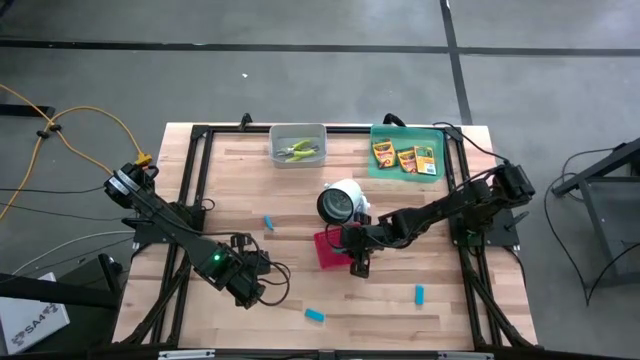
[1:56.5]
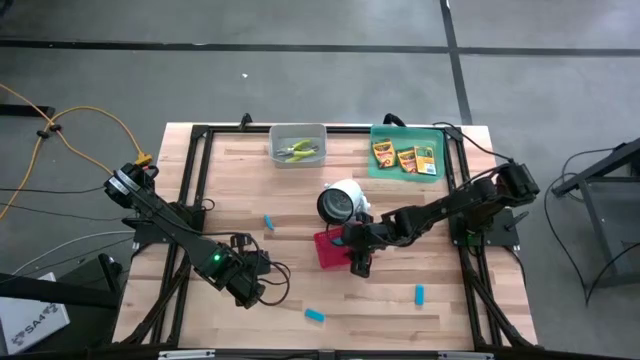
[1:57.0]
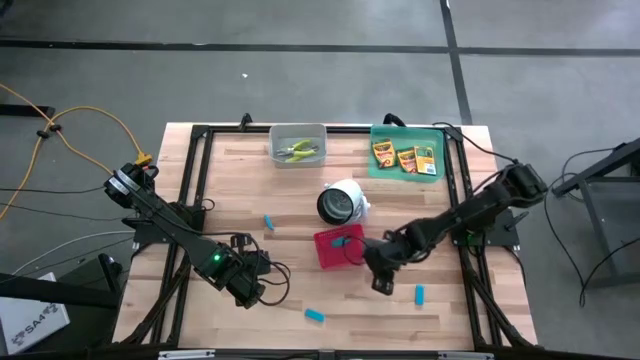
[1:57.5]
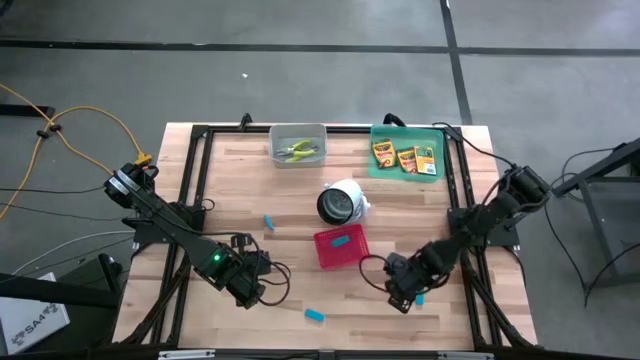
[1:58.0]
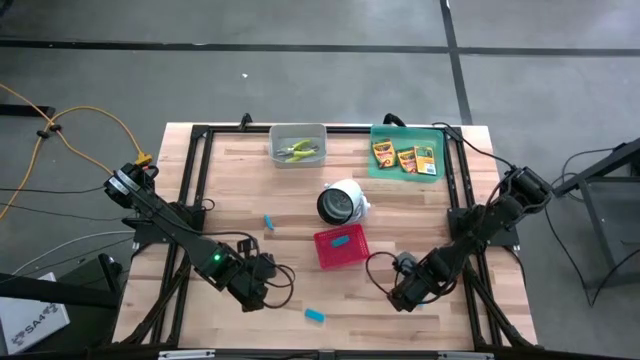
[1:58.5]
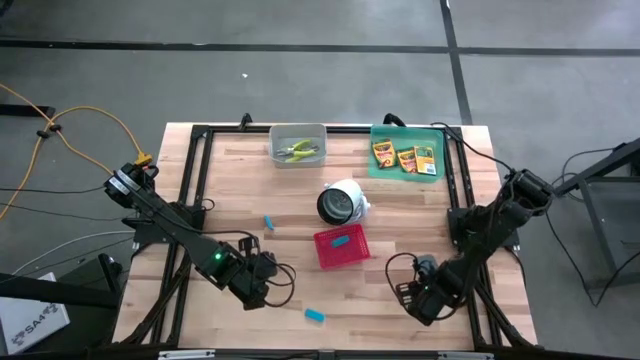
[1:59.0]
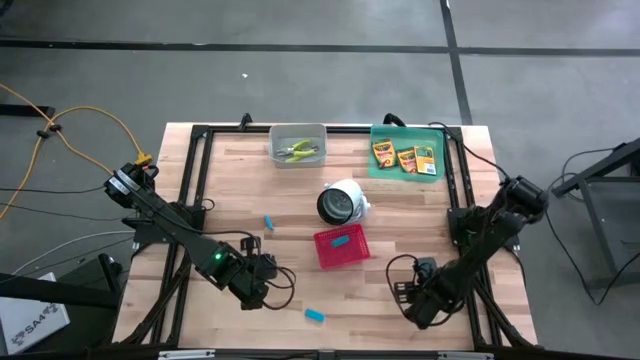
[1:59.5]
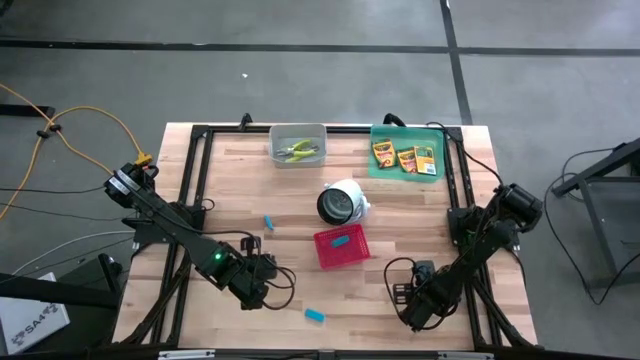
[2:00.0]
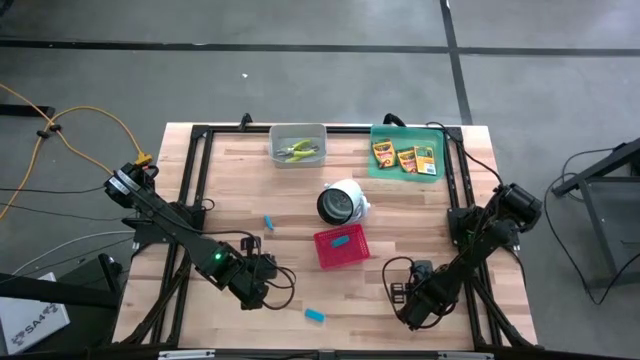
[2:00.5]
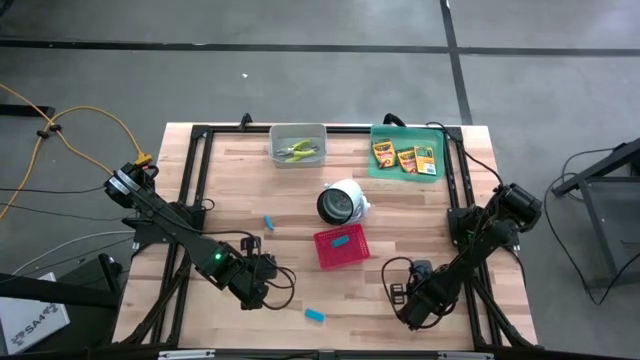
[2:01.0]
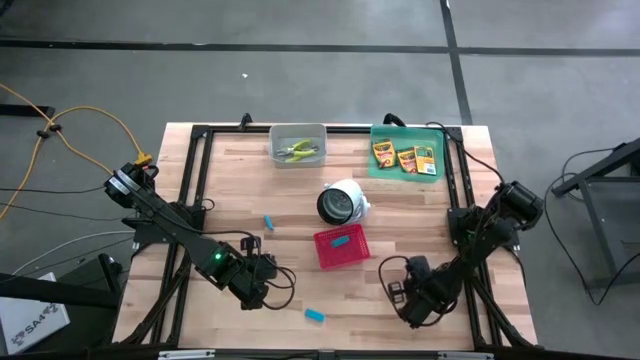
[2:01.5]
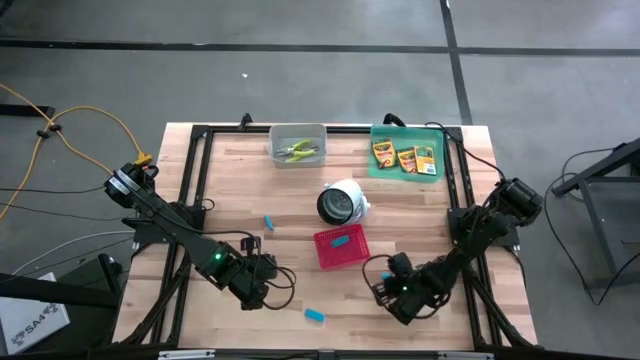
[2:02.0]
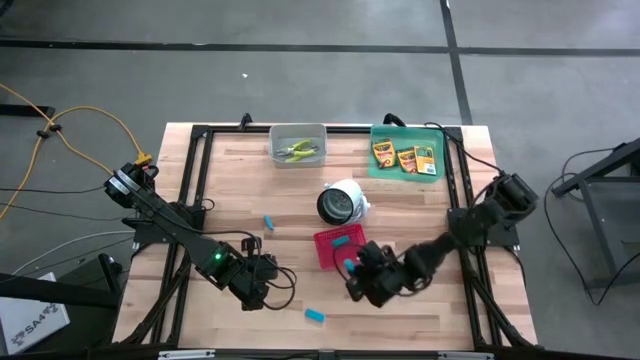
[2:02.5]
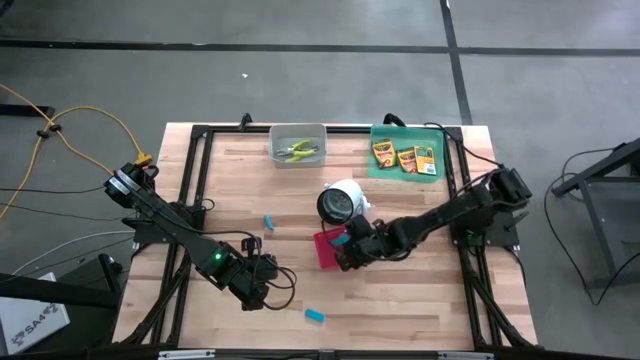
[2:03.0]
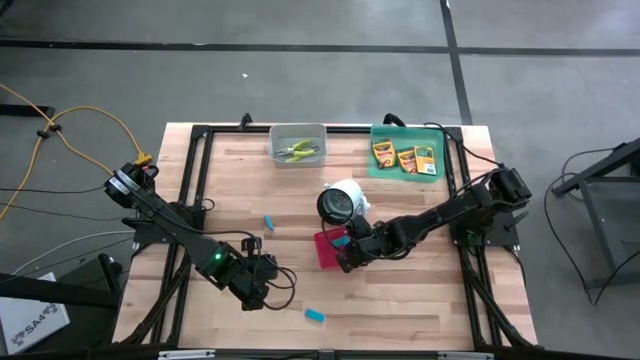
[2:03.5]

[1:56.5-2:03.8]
Task: Pick & Place School Supplies
Put the blue eraser into the red bin

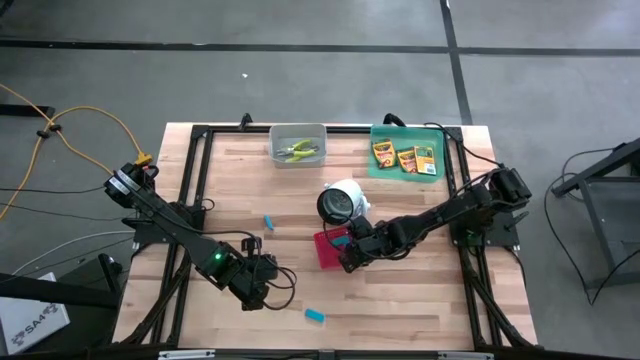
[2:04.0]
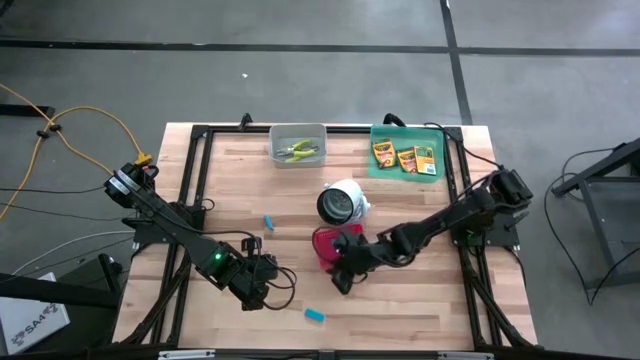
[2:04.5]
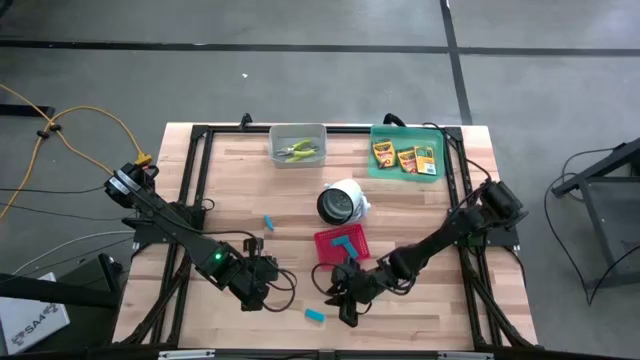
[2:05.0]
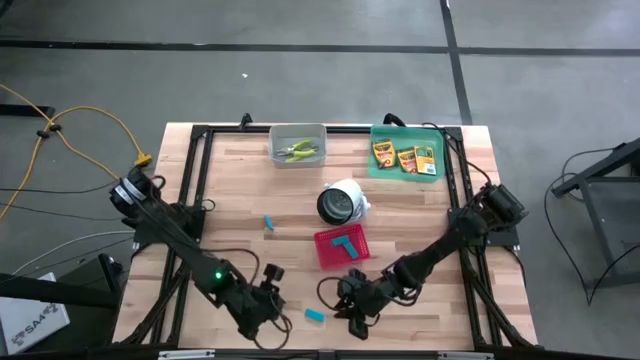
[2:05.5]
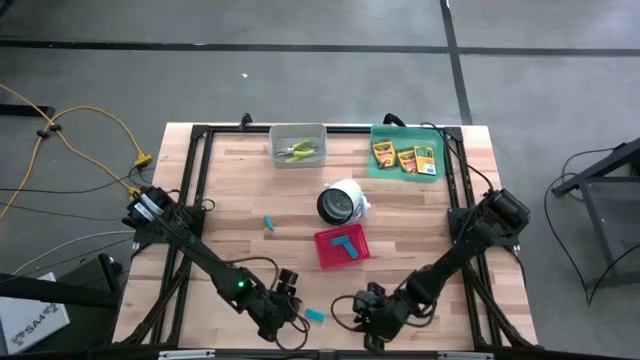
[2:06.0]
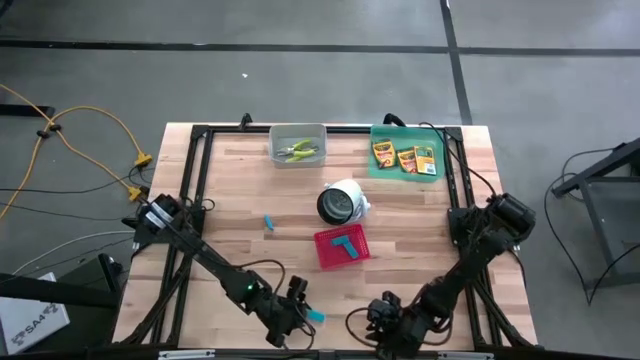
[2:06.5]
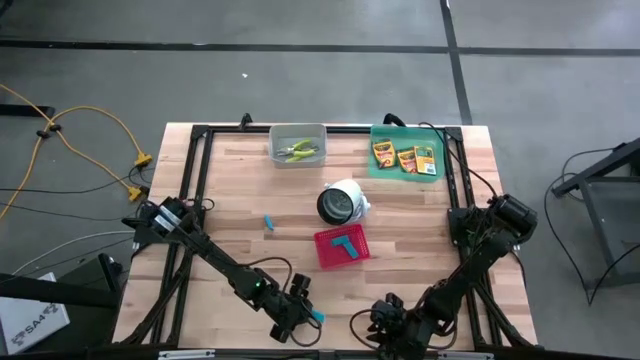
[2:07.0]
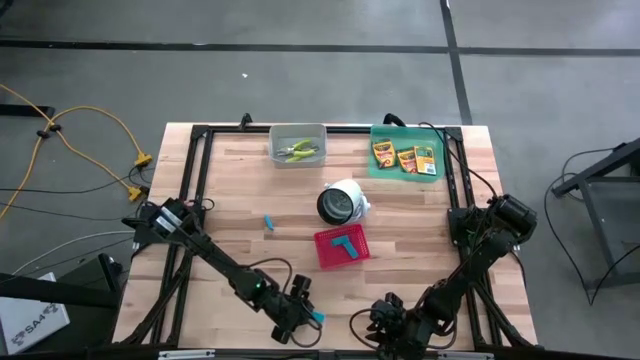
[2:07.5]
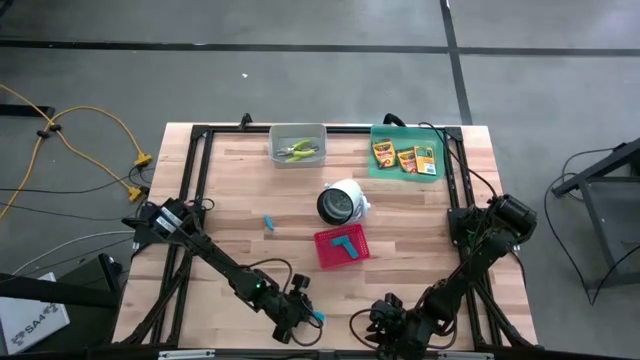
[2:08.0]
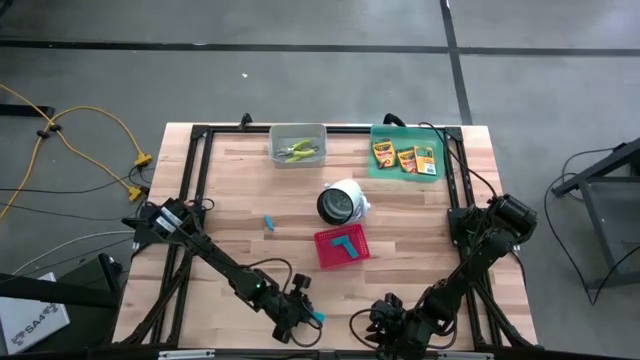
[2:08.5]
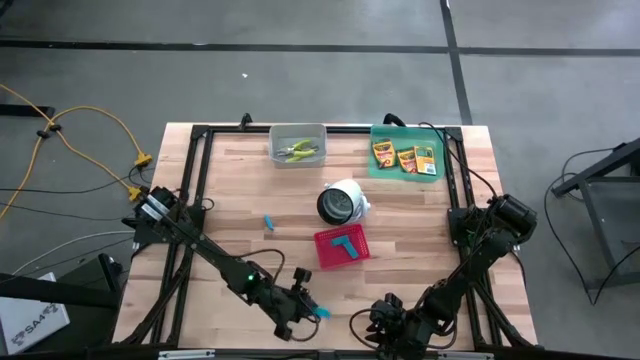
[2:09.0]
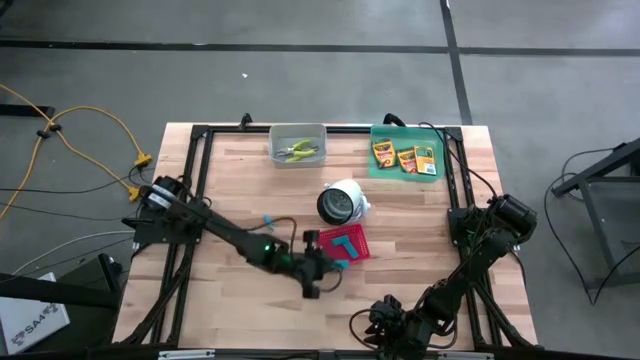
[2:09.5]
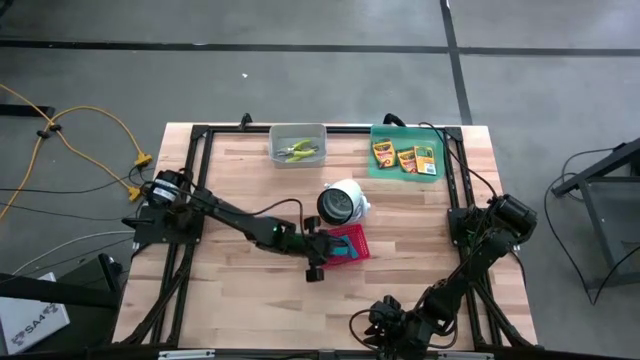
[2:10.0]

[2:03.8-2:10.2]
Put the blue eraser into the red bin

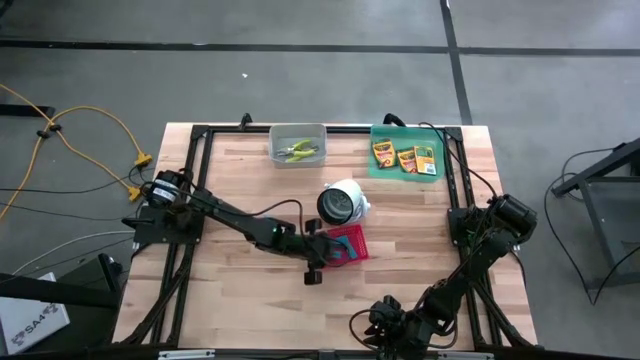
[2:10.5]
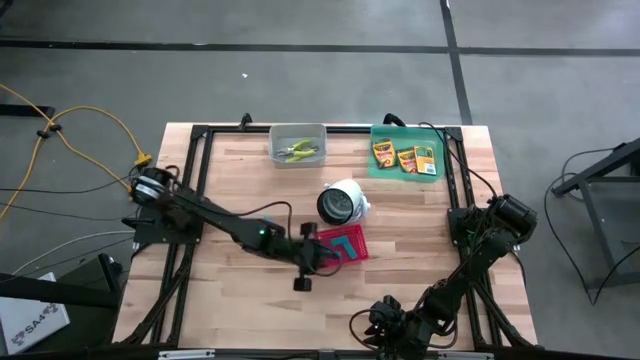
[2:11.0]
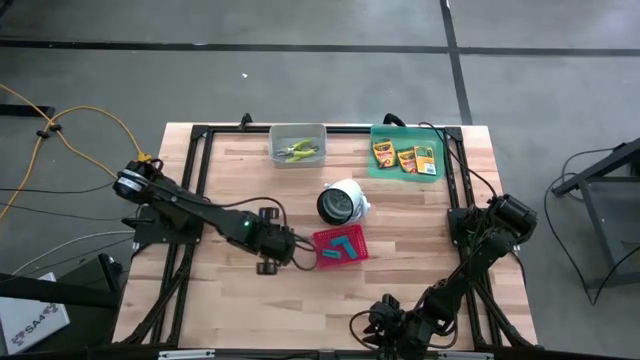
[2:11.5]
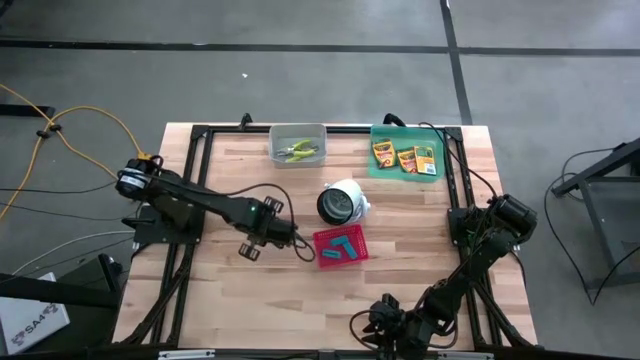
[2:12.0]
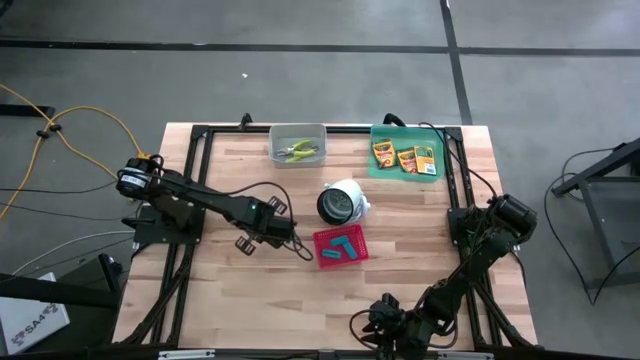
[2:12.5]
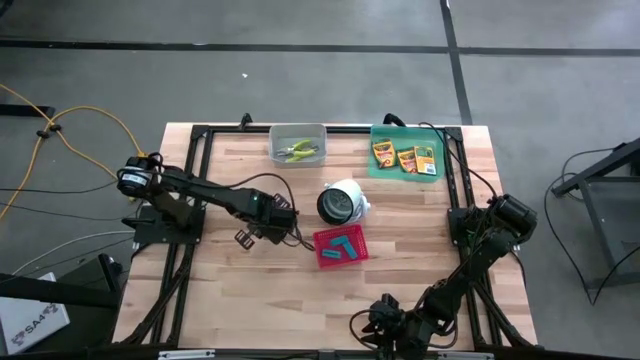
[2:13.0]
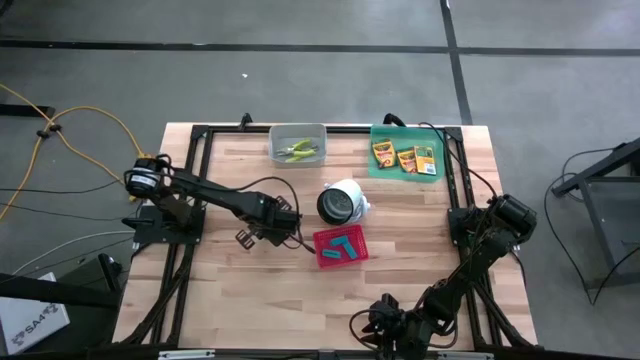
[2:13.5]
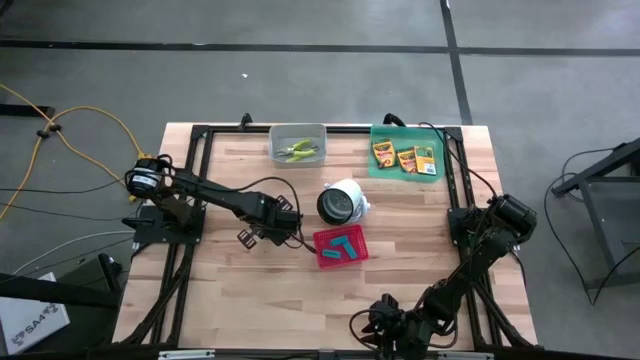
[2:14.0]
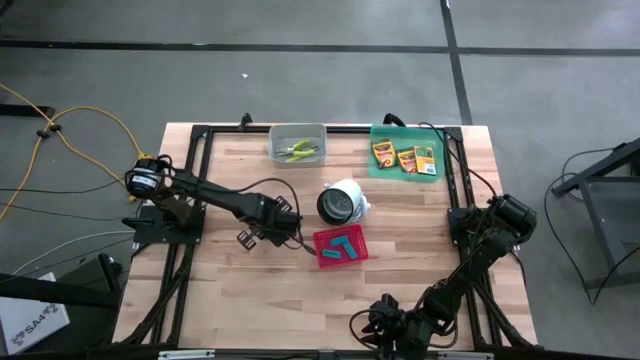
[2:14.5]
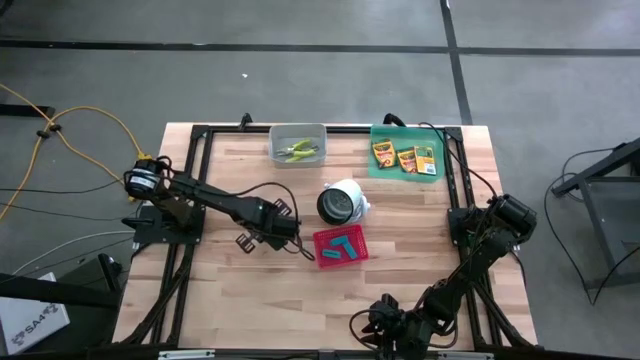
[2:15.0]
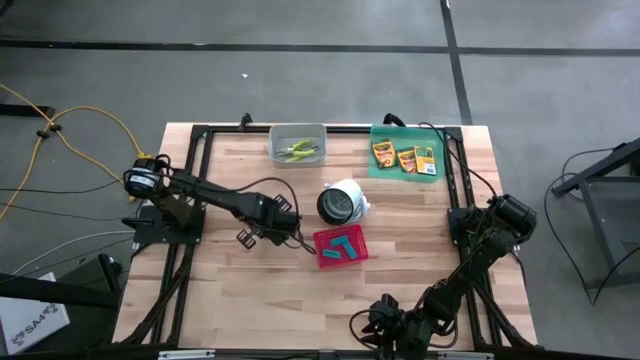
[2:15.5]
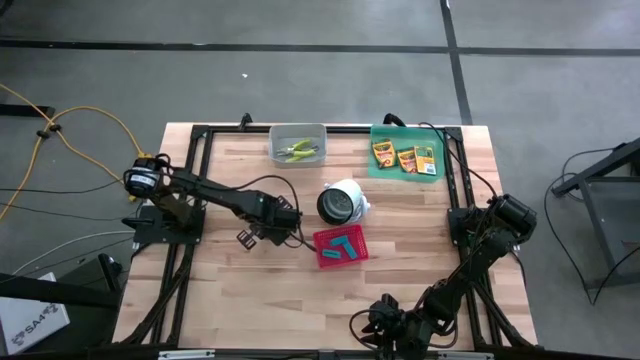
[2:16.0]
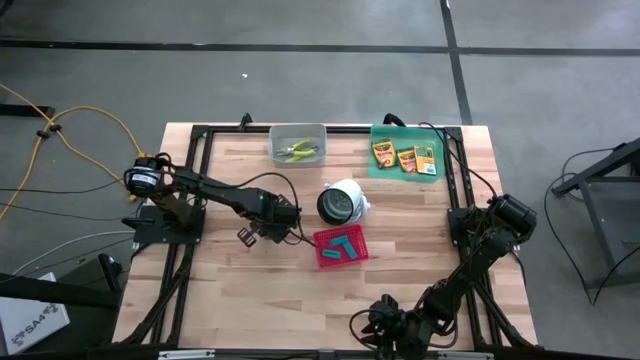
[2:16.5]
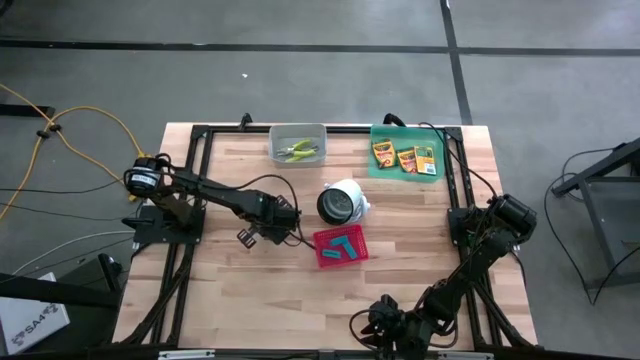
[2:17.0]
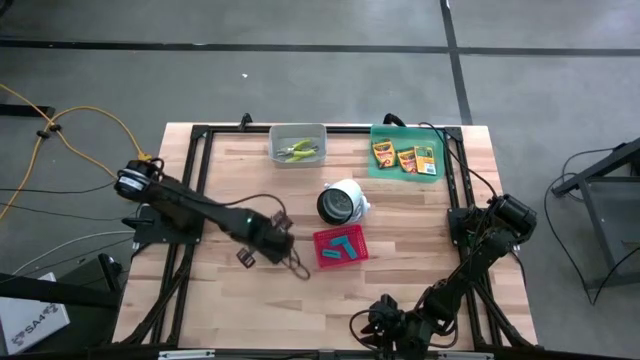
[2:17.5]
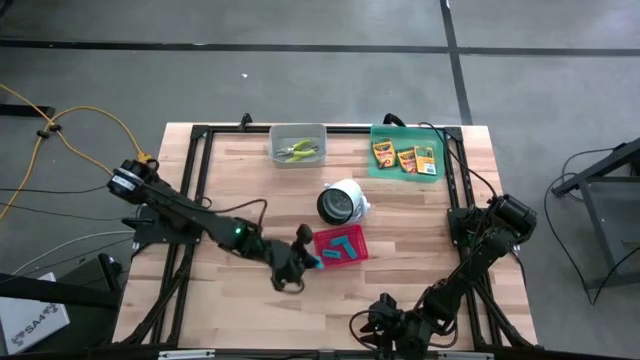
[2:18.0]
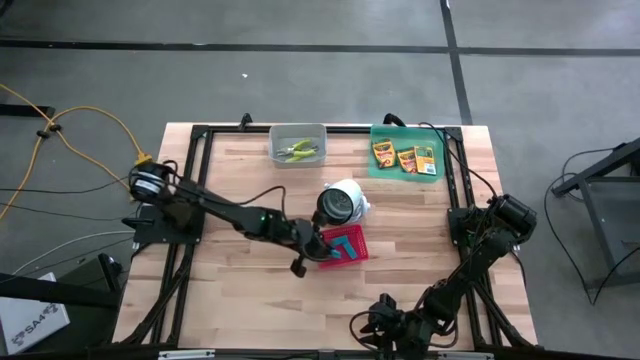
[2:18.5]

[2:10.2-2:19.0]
Put the blue eraser into the red bin
